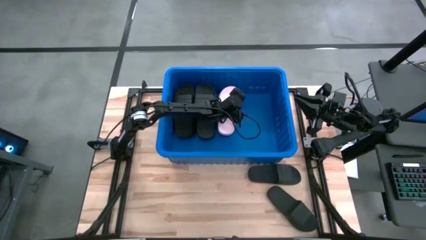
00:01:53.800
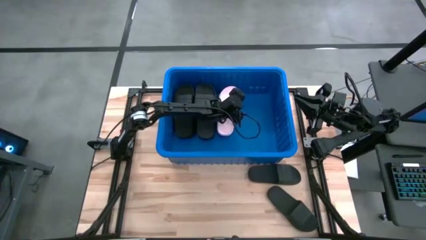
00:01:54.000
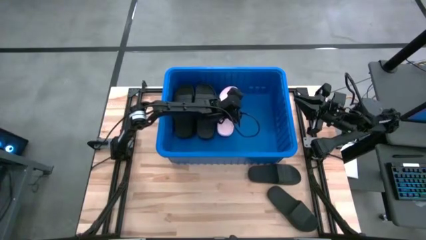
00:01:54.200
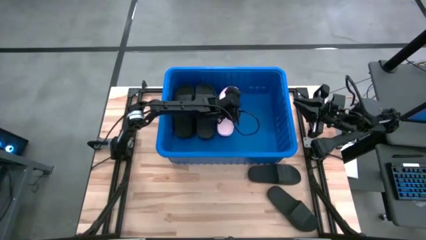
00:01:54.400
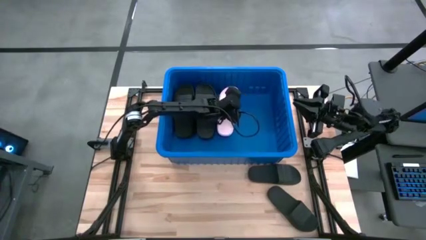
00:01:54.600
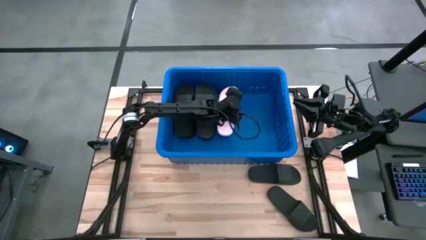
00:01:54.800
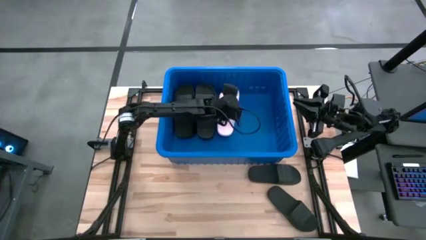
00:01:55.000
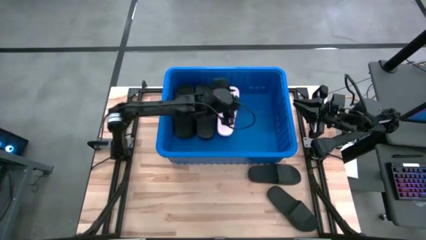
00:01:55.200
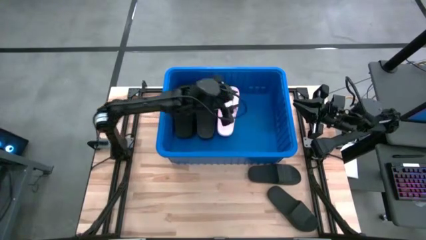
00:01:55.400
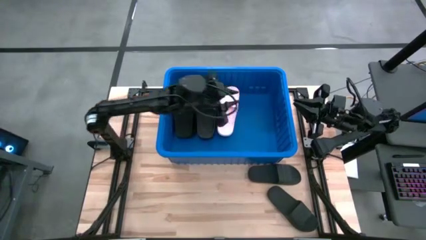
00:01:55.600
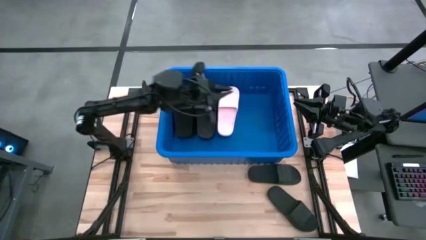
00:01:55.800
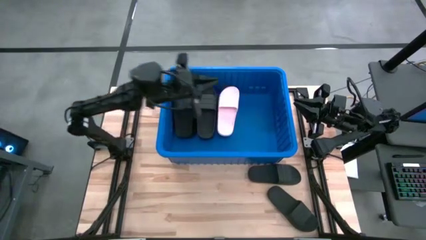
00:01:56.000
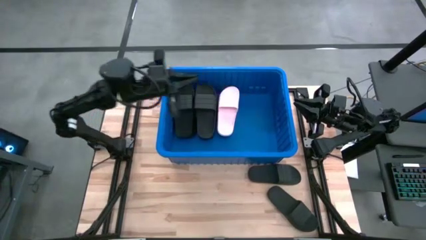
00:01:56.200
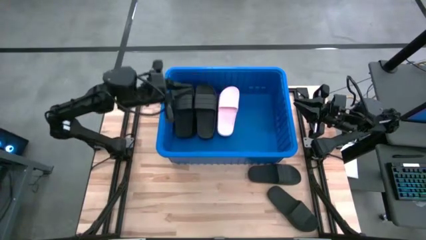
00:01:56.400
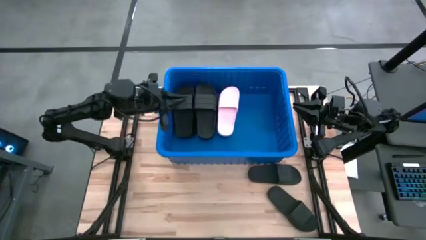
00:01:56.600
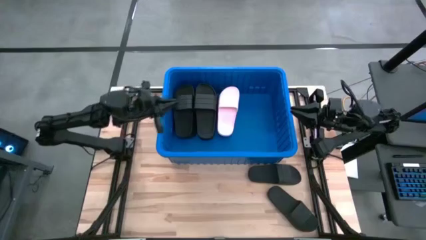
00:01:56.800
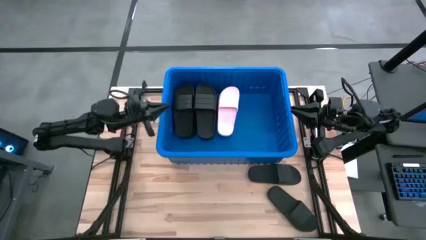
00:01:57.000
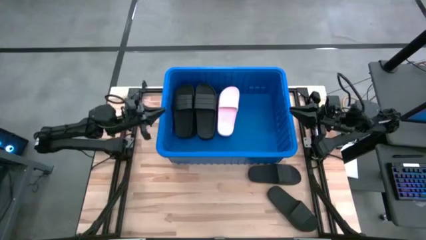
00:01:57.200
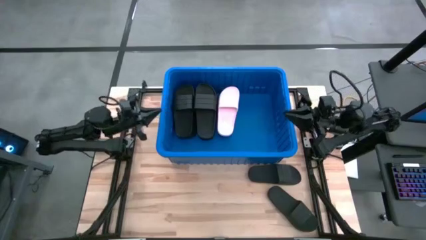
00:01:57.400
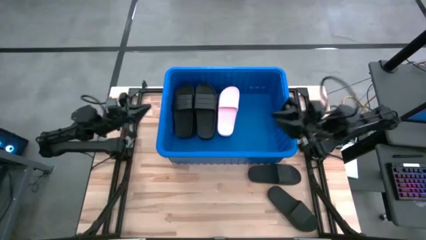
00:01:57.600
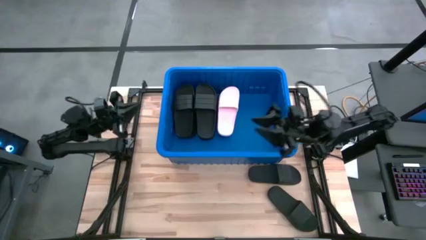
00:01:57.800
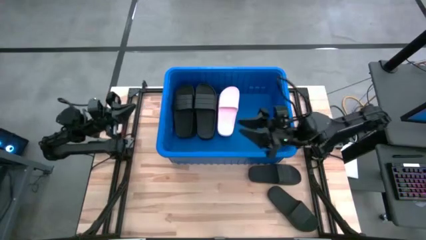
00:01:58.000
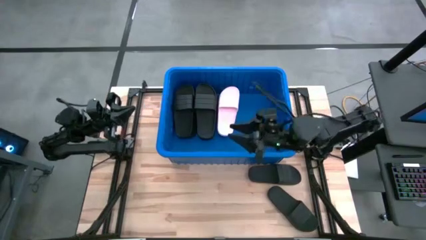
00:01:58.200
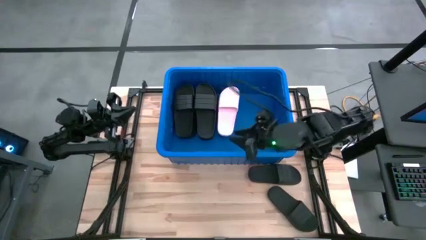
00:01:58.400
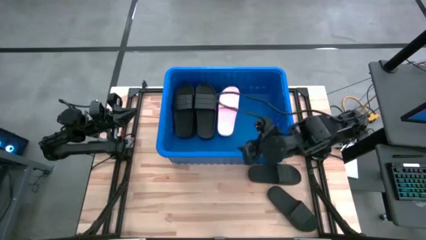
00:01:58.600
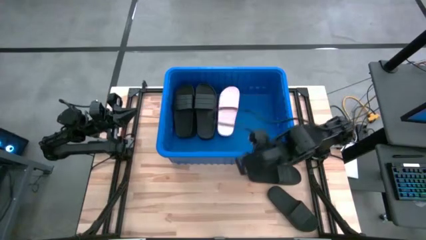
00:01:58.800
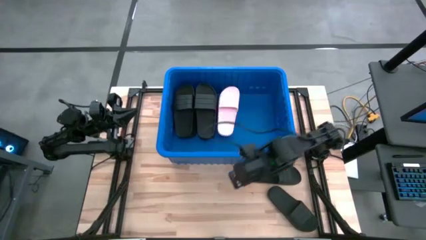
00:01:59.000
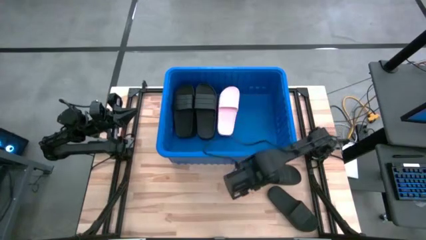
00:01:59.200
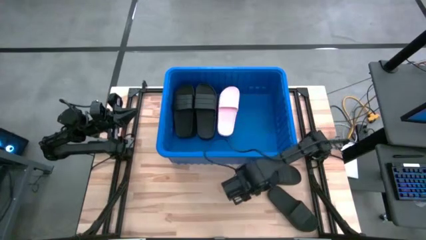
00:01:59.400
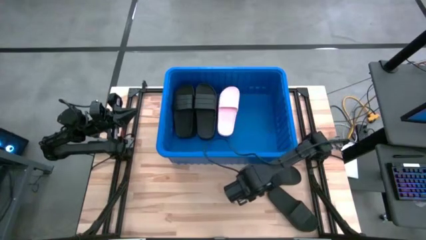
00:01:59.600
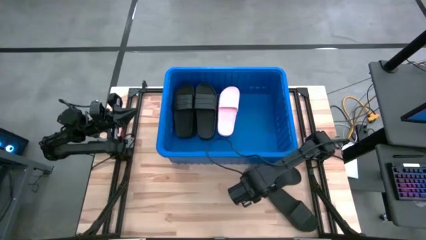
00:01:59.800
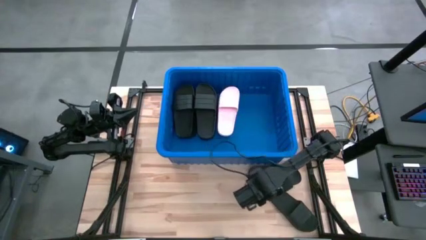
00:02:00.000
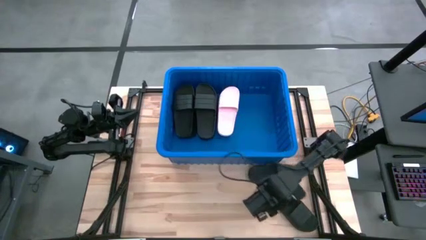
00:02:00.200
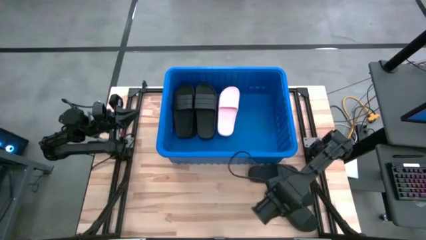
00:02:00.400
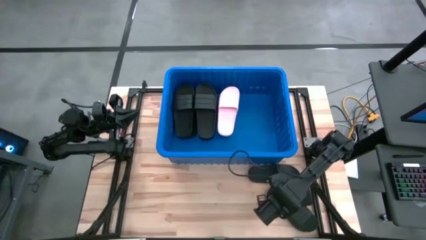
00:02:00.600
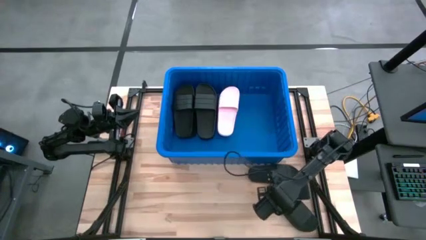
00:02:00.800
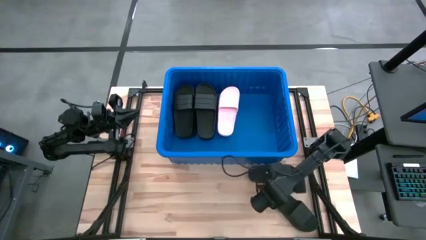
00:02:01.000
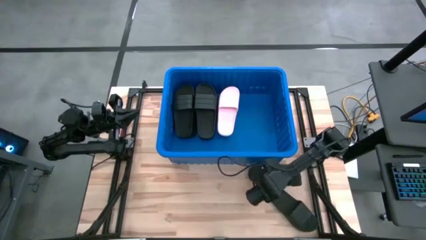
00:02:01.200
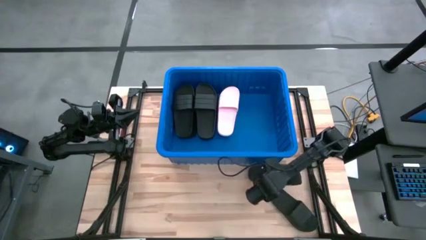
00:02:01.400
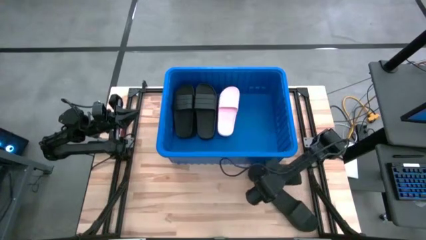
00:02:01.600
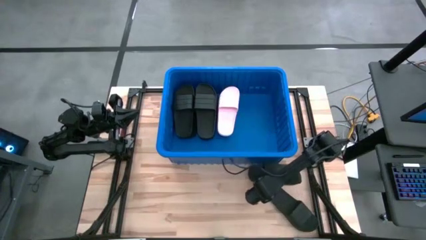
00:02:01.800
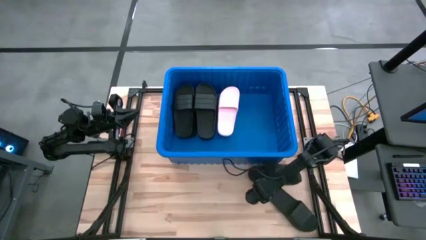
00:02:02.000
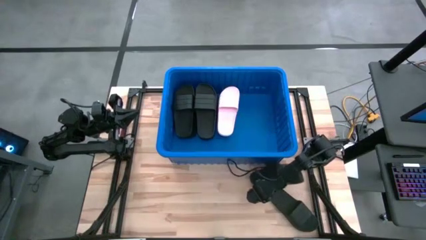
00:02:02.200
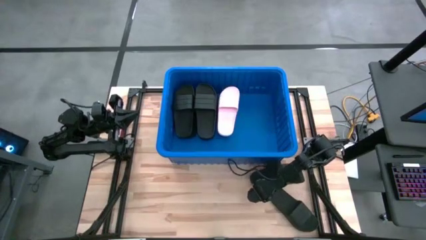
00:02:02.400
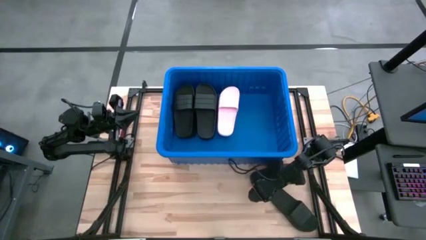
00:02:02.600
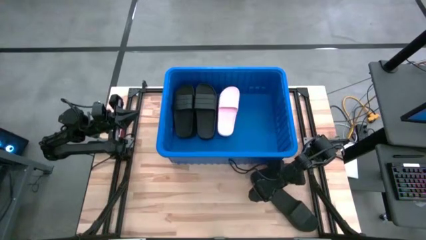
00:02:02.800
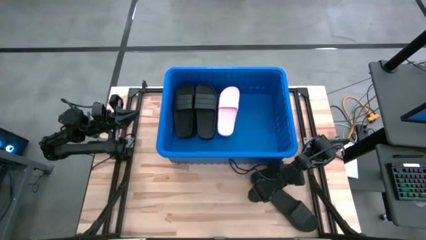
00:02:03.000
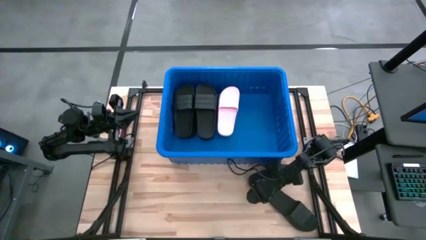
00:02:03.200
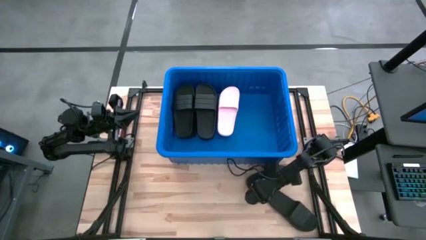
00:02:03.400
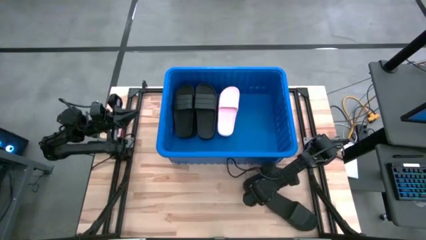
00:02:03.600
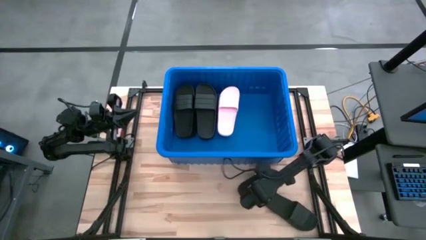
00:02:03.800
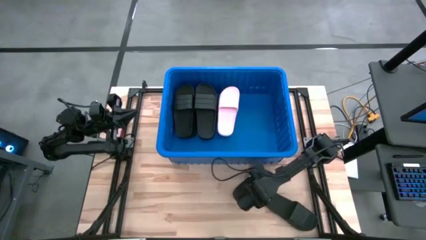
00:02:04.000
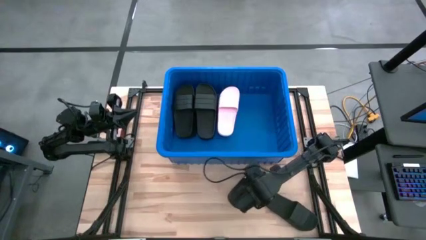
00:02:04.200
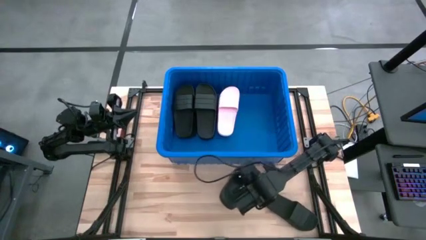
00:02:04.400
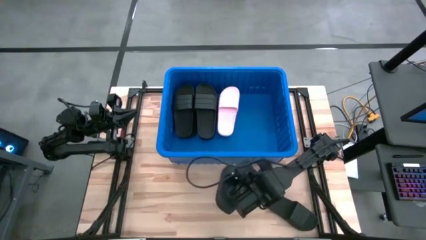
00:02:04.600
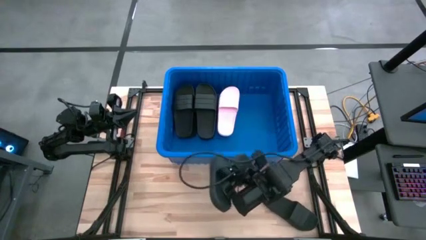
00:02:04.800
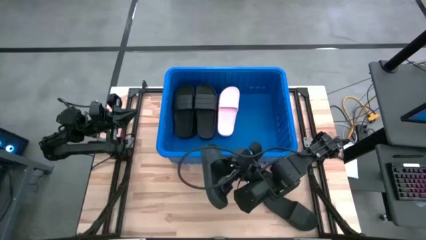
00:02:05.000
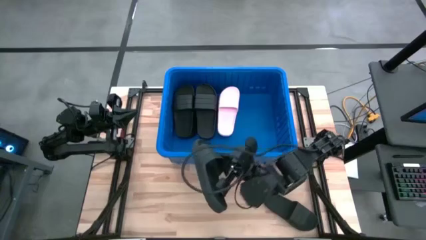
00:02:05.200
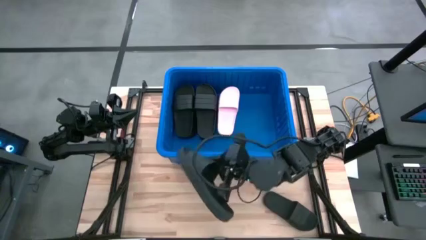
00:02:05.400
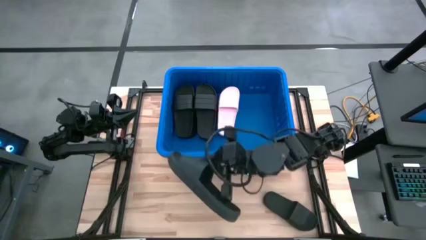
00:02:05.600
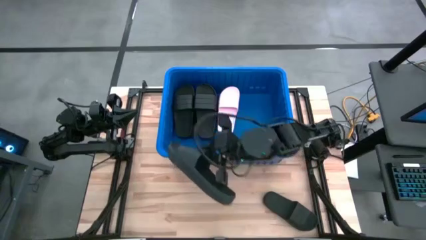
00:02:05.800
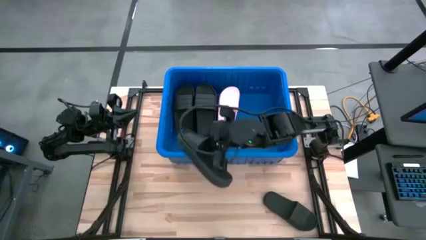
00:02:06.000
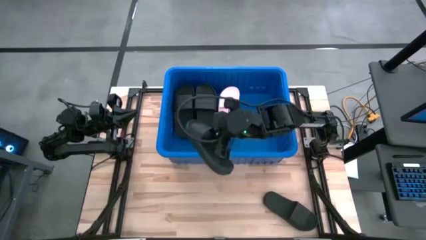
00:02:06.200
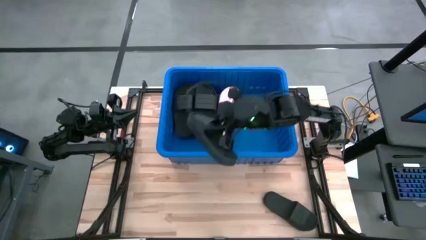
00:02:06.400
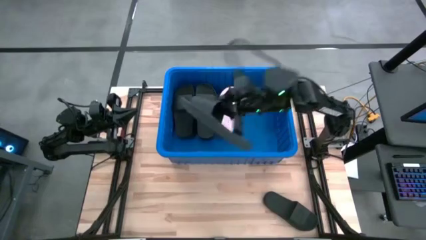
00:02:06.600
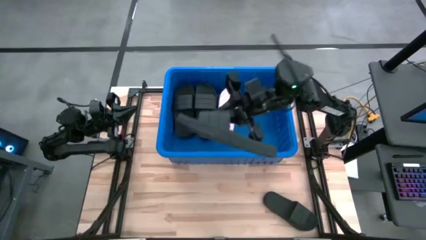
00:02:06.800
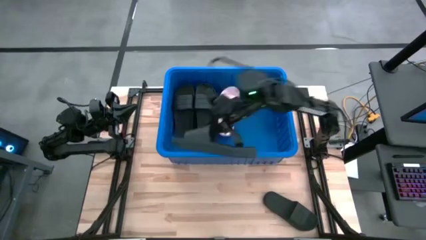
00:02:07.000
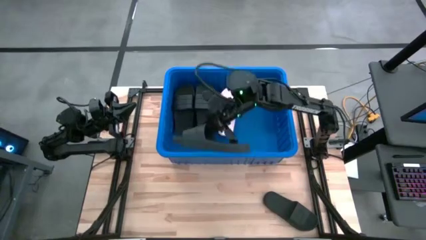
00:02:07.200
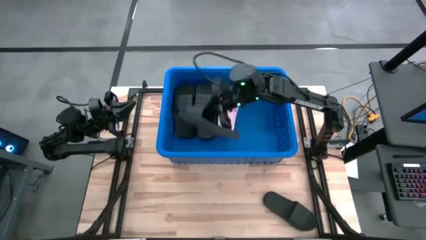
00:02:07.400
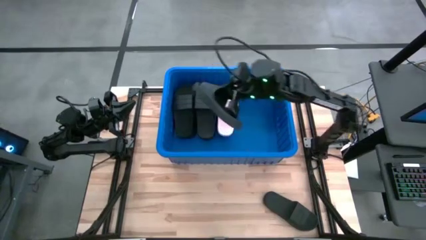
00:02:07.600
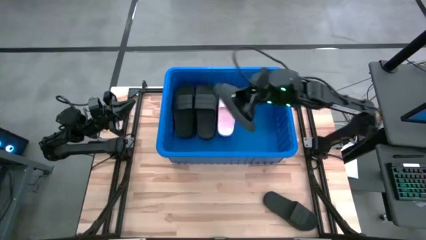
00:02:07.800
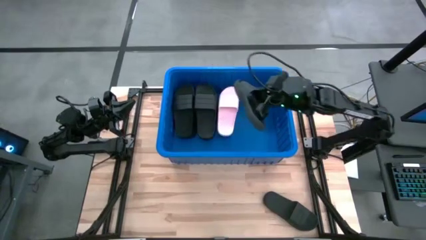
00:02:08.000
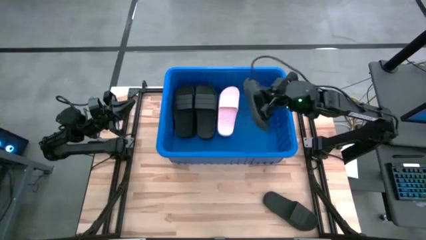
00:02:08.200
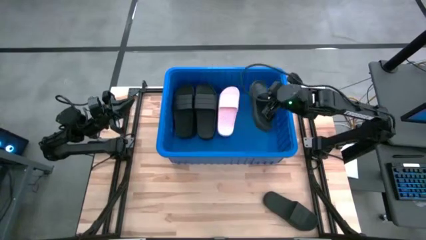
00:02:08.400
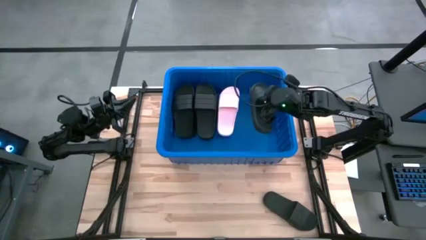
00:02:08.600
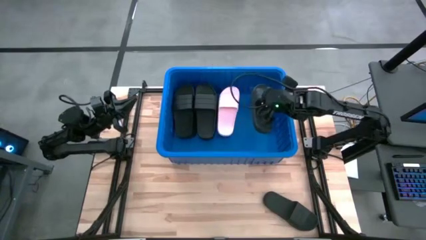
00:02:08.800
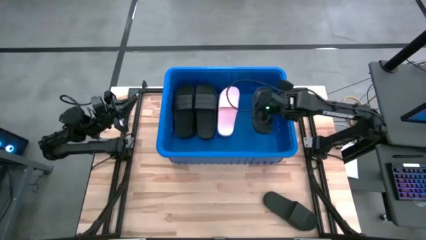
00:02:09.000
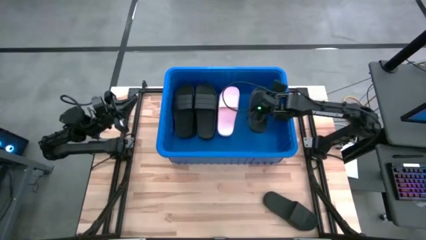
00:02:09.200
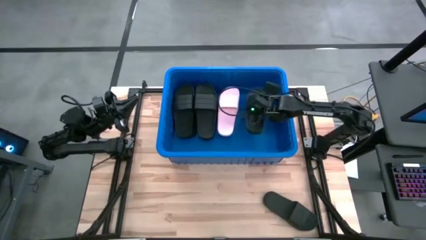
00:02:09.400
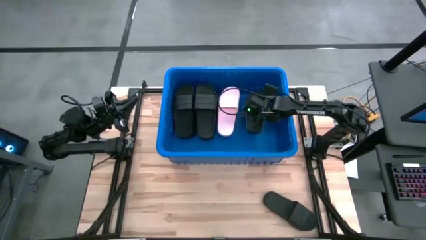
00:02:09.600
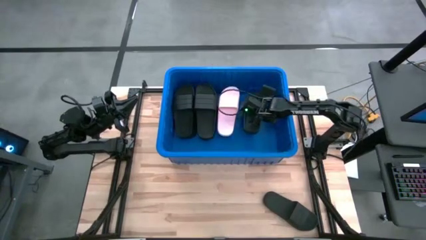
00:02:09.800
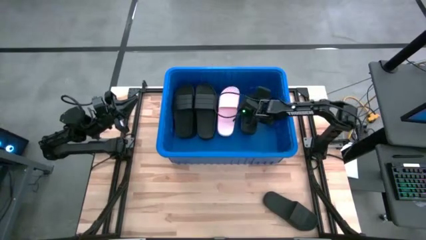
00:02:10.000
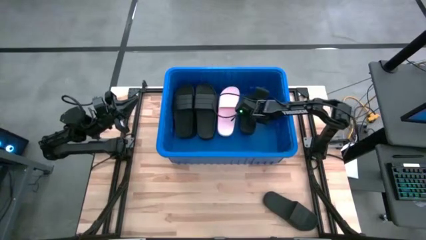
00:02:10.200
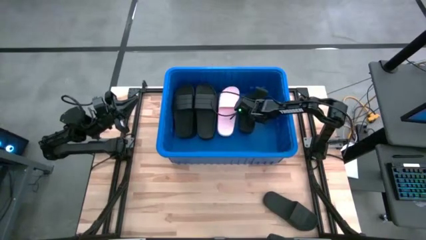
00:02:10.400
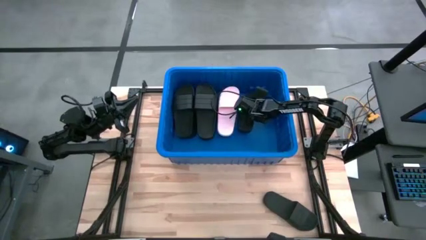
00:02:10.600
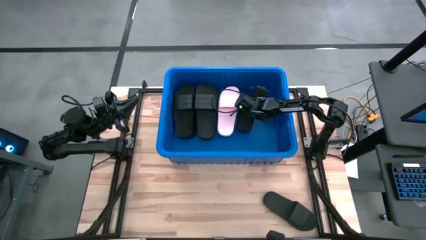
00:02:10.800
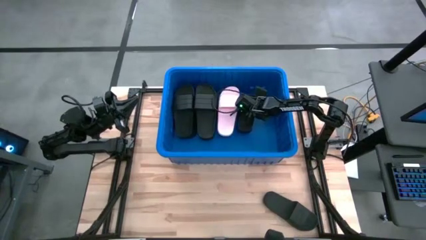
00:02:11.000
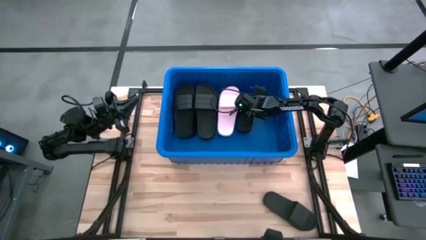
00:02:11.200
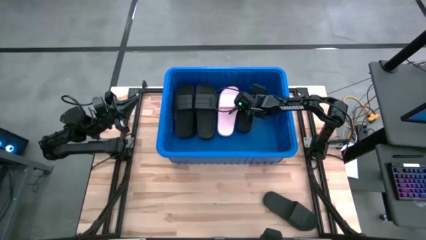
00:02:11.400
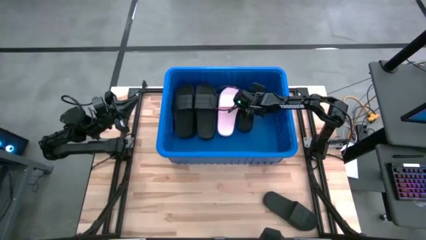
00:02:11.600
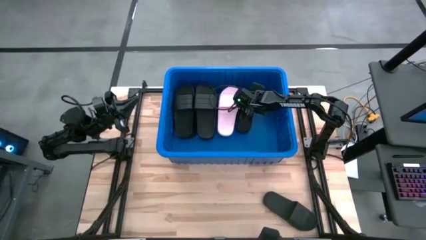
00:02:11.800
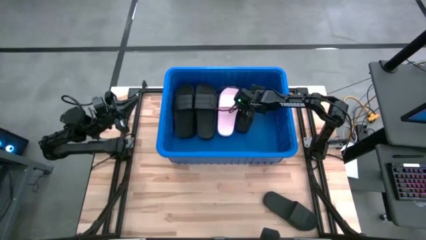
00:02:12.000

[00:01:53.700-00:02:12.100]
Task: Pick and place slides into bin
Put the black slide into the blue bin
